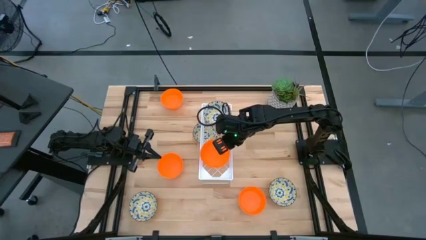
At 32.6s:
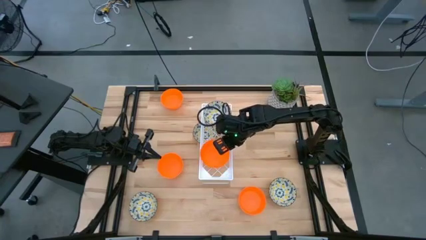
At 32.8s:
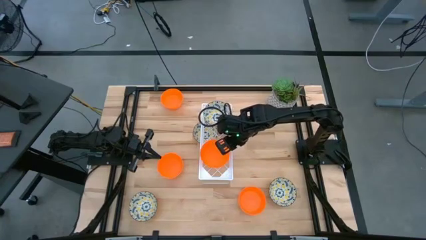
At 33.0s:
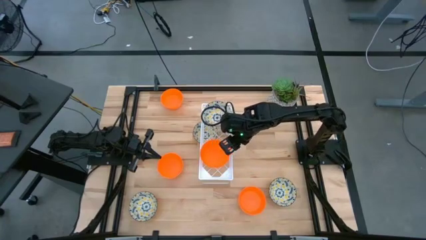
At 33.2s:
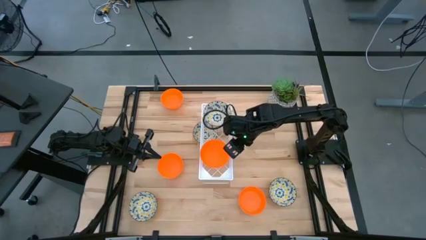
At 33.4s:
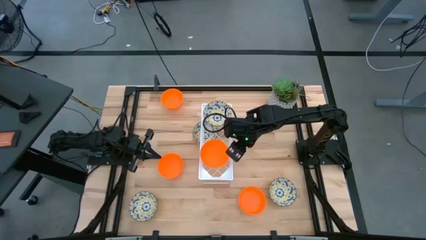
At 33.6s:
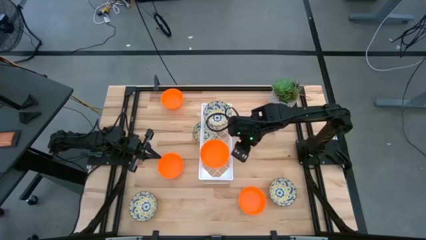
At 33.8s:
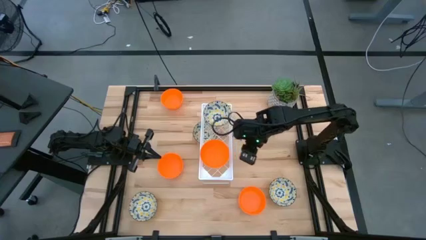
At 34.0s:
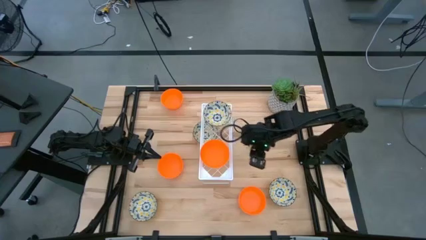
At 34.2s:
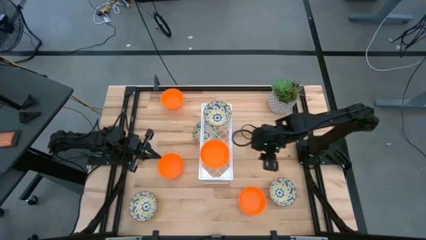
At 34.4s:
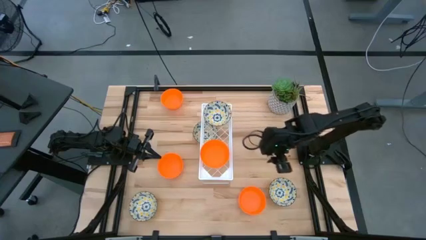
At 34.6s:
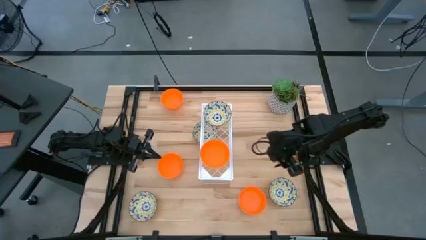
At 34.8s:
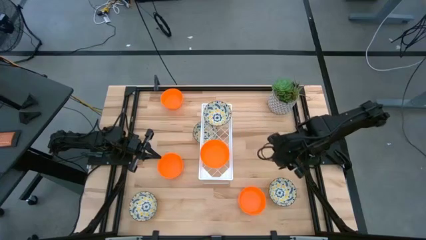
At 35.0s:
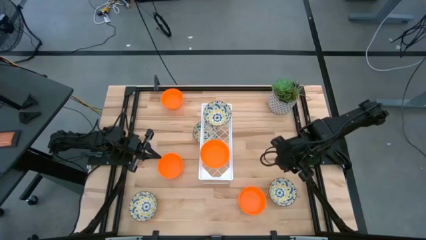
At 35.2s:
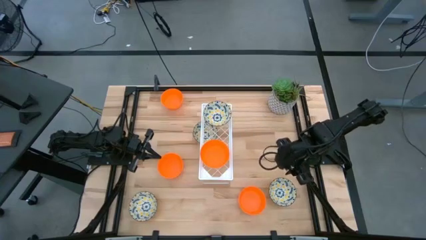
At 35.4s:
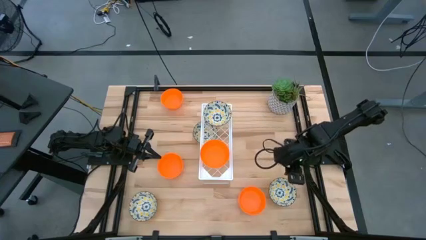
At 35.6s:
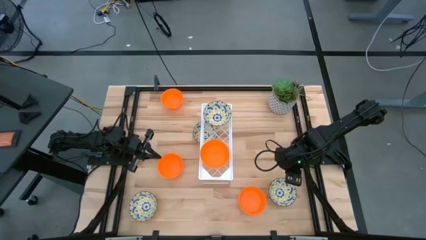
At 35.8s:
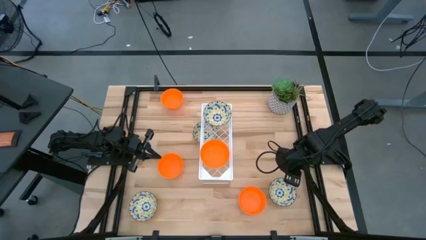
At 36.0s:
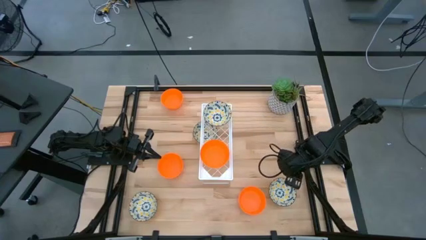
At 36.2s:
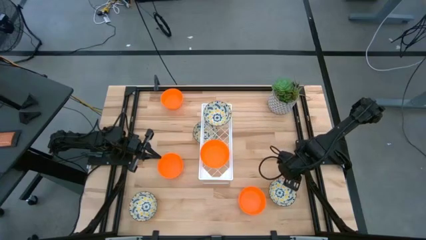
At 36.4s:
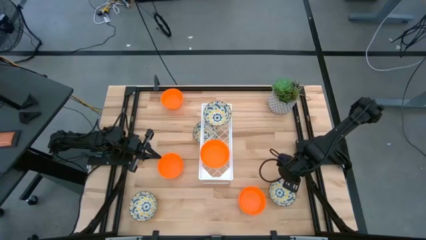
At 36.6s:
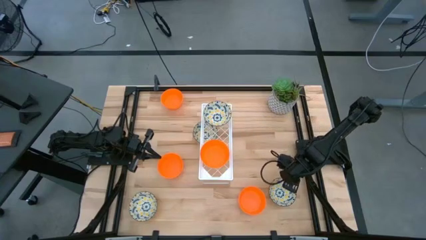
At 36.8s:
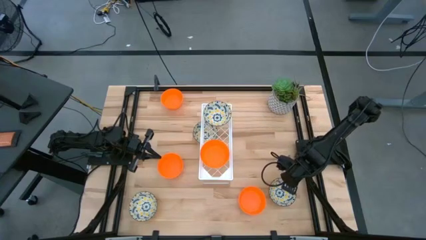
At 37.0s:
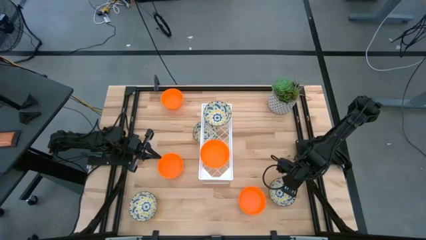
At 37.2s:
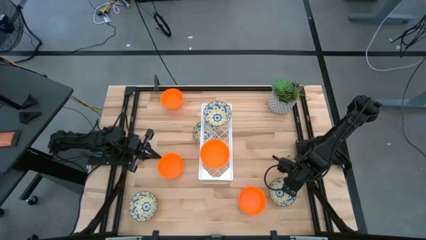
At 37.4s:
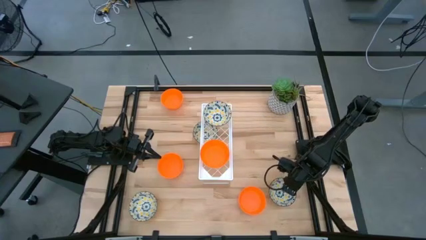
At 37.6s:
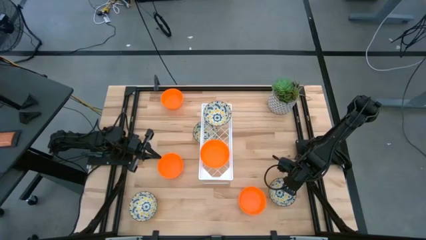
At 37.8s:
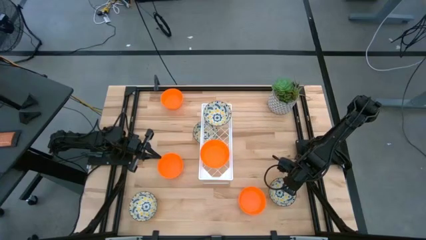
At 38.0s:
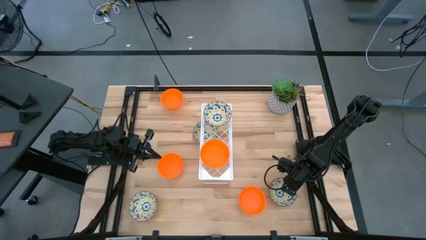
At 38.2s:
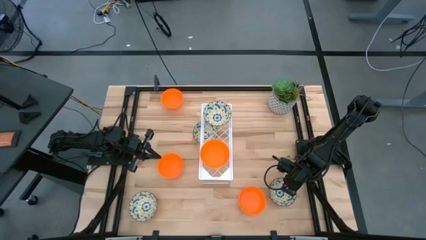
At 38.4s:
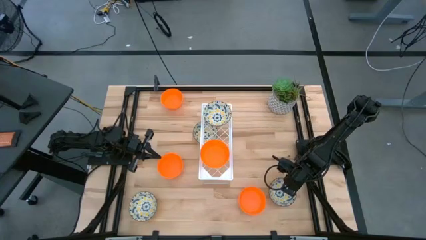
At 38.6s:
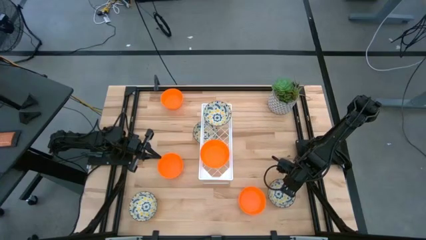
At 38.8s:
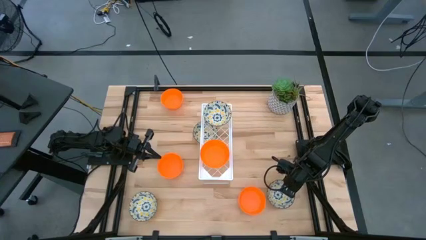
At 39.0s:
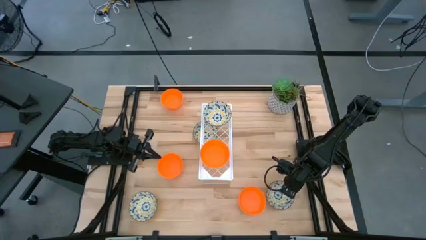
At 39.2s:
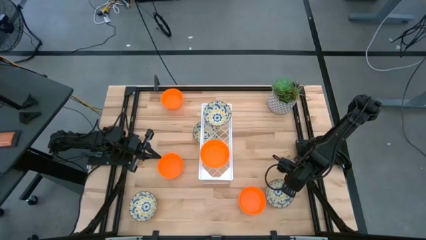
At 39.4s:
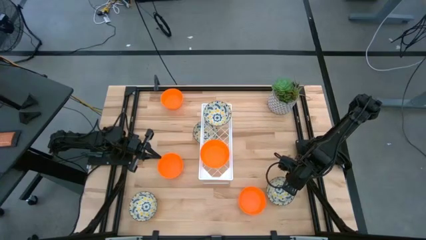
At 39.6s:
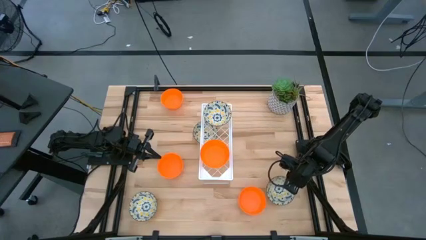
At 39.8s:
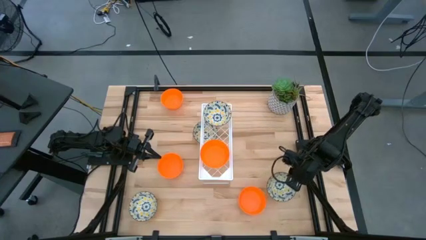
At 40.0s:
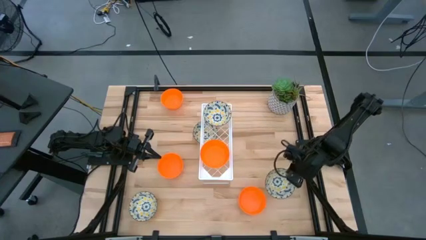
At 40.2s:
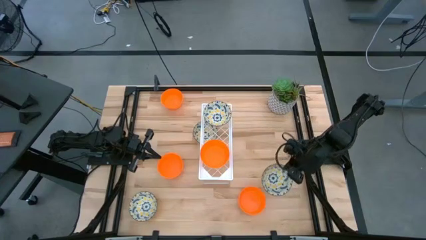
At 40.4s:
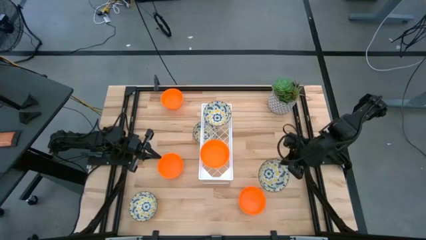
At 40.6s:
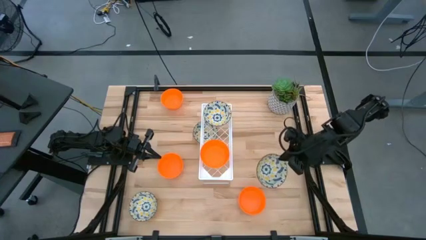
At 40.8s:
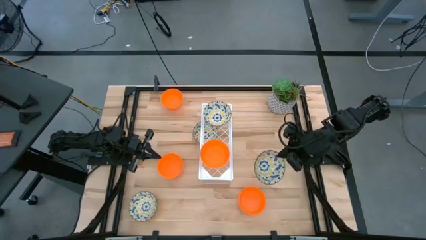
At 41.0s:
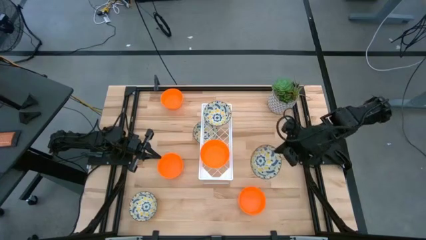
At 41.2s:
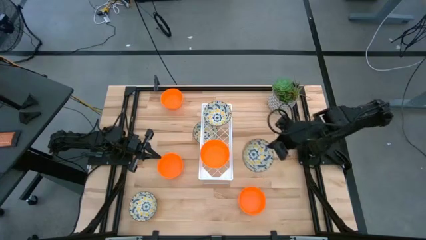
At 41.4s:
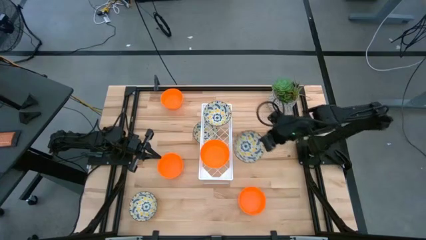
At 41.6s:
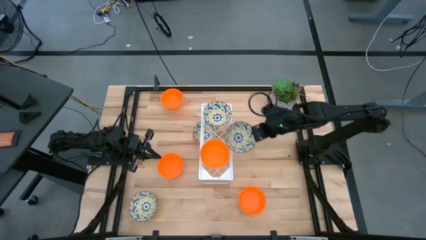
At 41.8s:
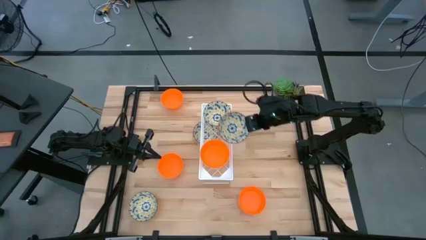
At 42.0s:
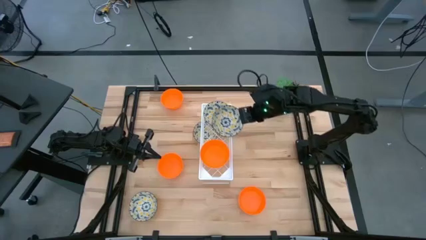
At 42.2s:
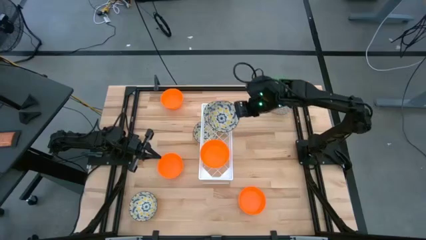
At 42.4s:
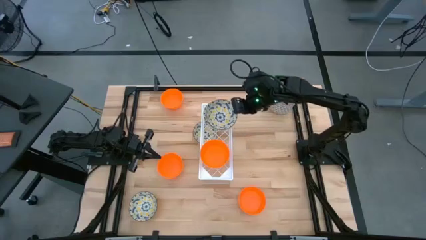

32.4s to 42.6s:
Task: Pick & Place Mini bowls
Stack the yellow patterned bowl on top of the yellow patterned bowl on the shelf

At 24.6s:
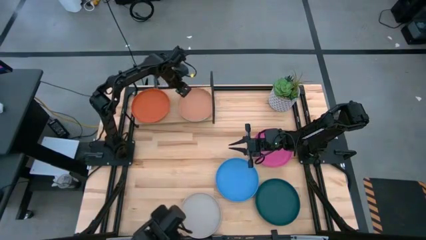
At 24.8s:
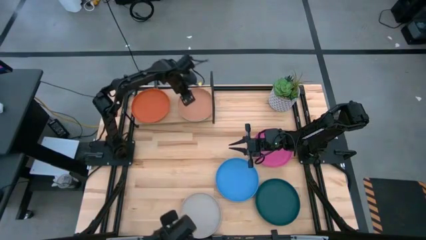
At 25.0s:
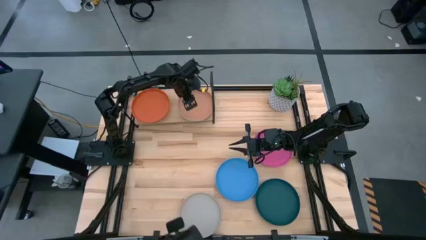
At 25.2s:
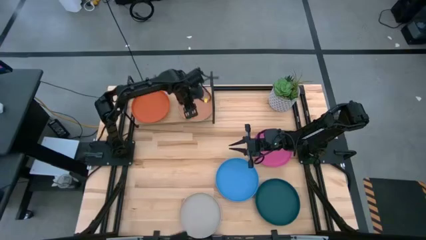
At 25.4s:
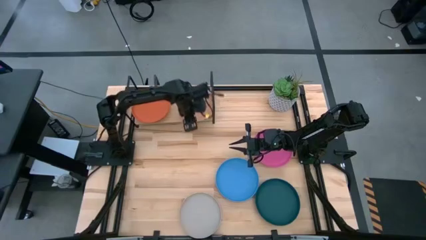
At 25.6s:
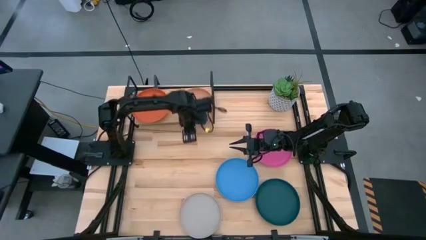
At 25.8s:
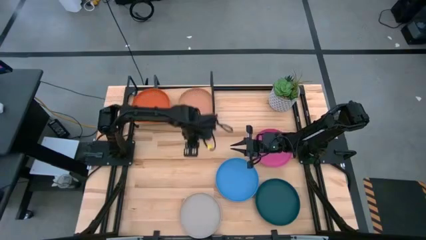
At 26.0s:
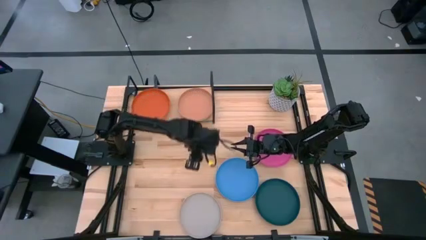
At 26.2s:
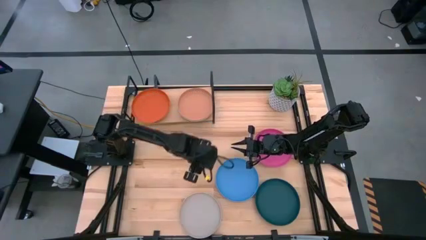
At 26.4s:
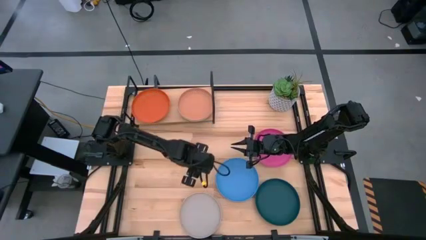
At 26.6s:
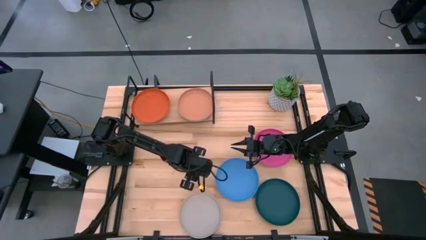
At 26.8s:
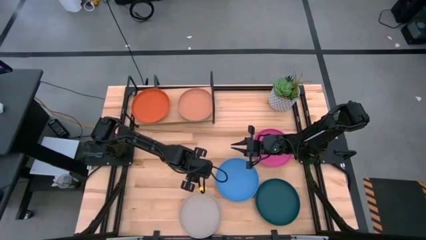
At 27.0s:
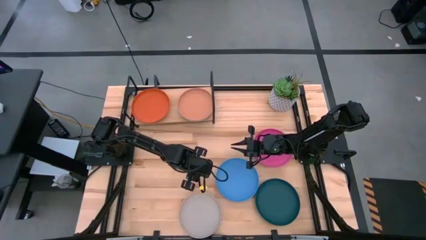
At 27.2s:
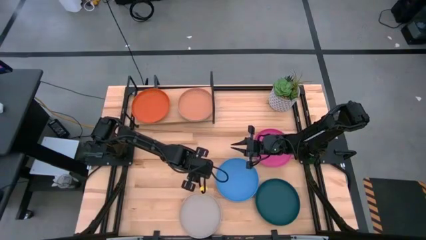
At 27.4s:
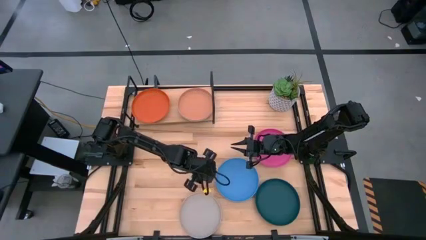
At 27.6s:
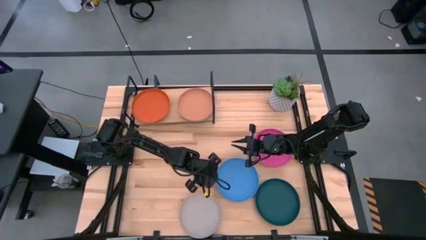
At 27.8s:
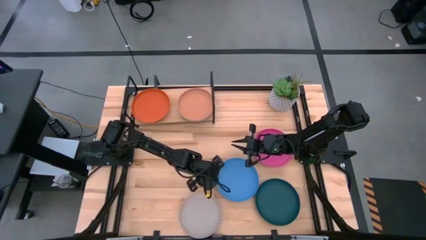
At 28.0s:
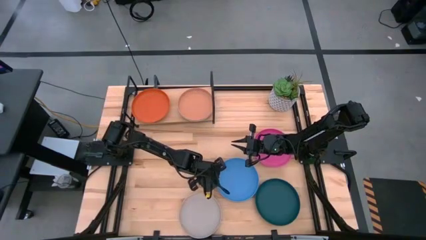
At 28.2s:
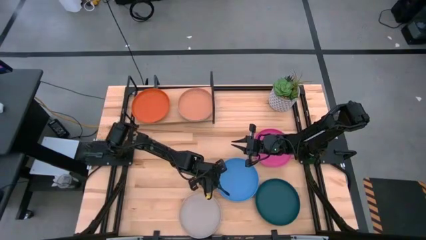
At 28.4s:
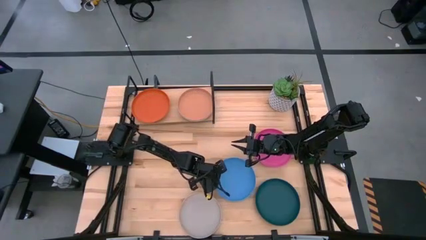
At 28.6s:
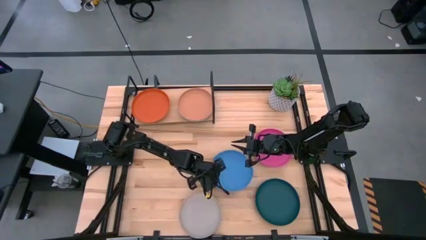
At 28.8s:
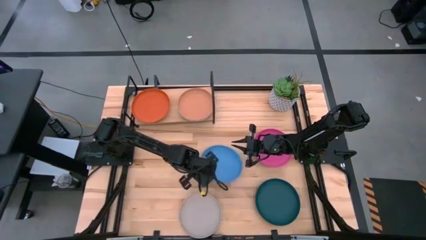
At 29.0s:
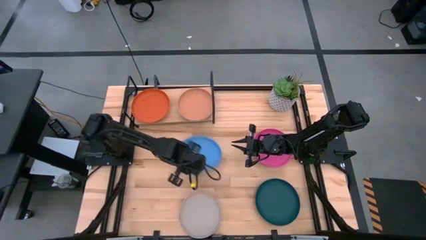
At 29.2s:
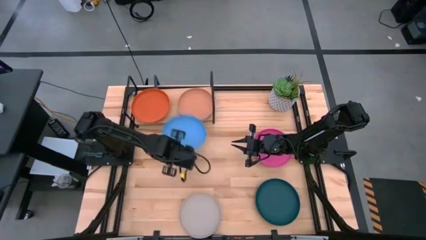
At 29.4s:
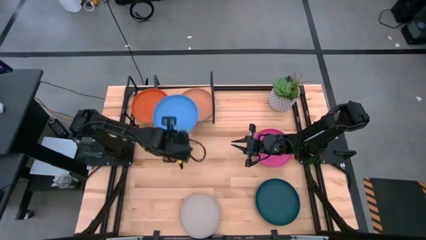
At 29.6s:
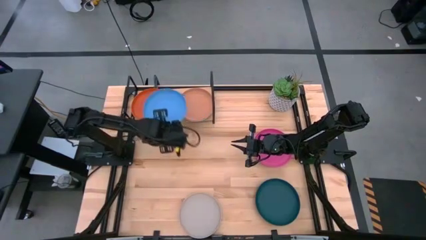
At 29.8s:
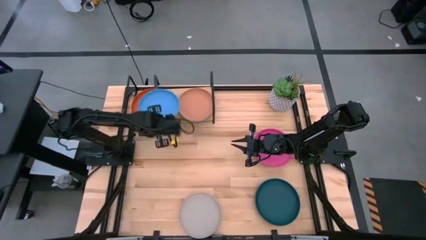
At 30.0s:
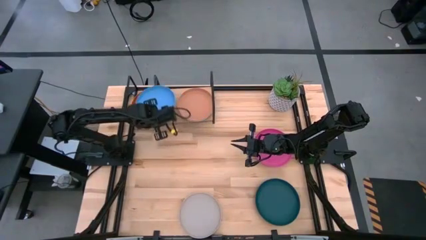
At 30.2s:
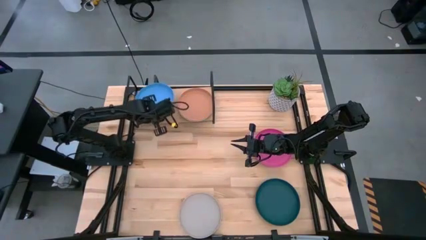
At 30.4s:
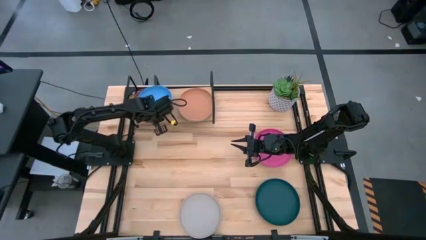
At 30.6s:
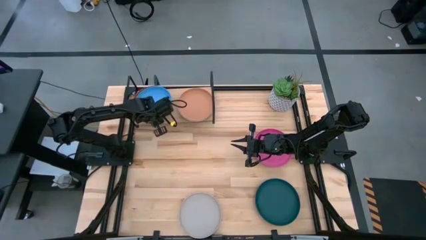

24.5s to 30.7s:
Task: Place and stack plates onto a shelf
Stack the blue plate on top of the orange plate on the shelf

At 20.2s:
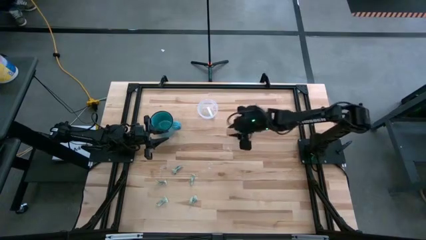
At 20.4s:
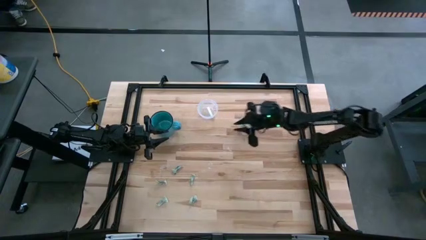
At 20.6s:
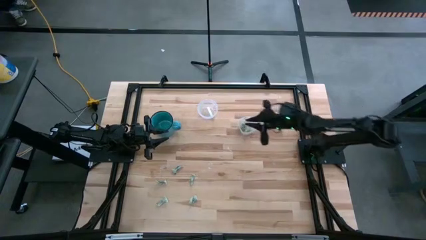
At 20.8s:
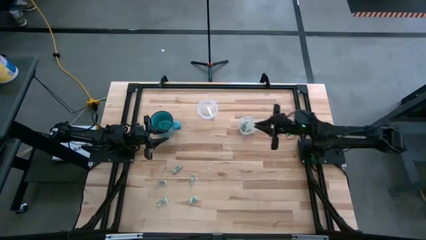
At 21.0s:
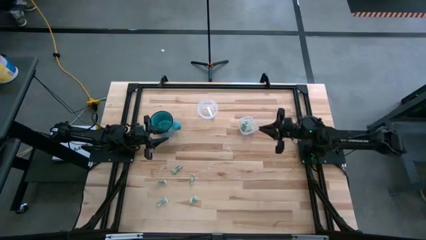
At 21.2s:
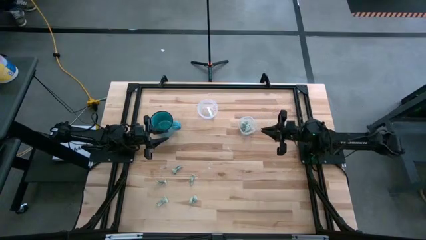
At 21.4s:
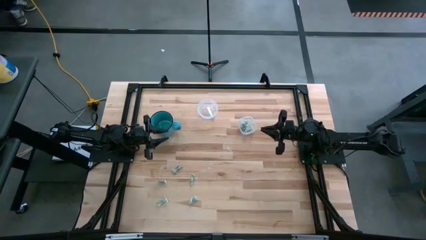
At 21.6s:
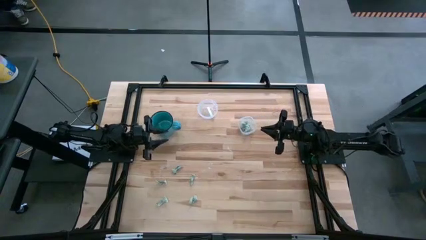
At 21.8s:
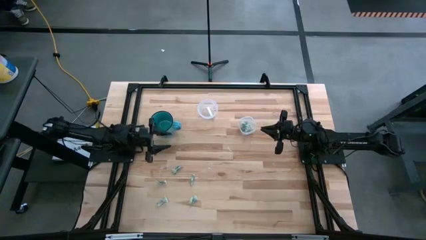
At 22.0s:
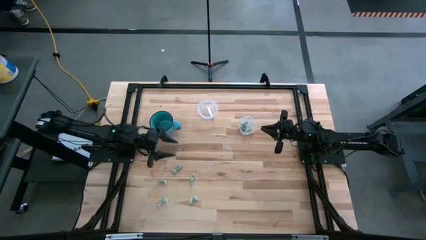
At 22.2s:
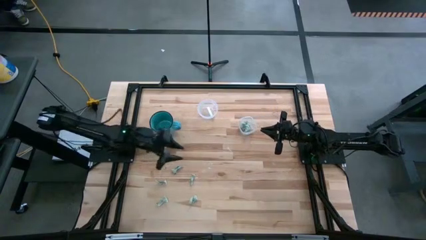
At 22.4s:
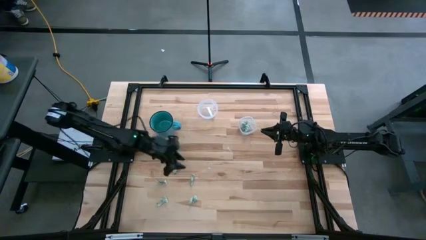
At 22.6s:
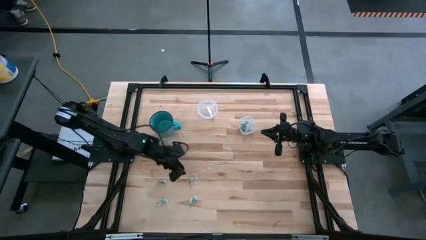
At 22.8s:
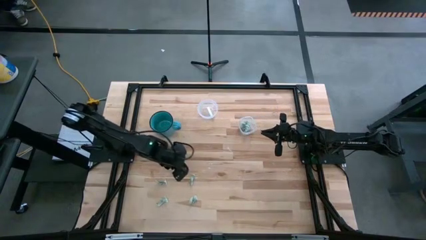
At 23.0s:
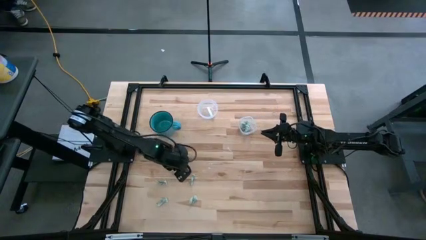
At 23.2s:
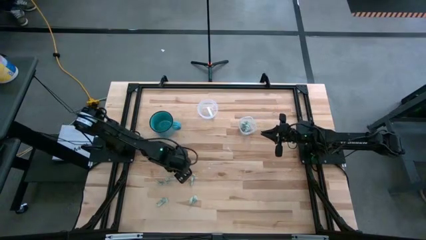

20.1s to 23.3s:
Task: Pick and place items into bin
Put the stevia packet into the large transparent bin
